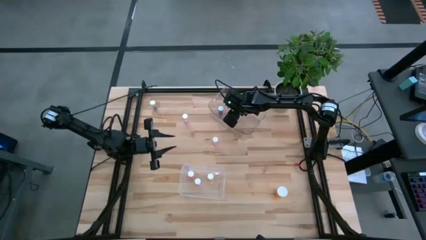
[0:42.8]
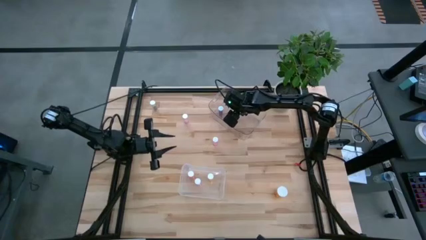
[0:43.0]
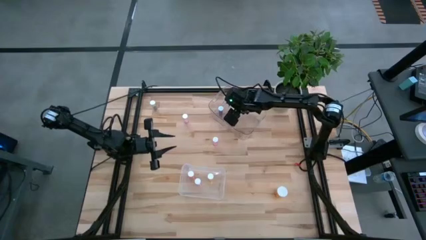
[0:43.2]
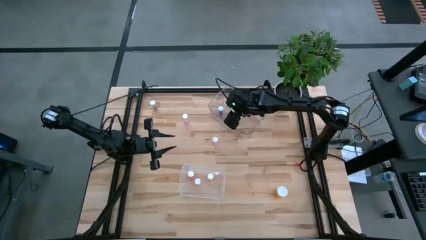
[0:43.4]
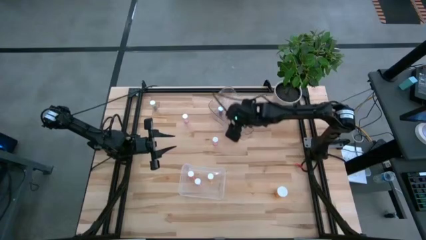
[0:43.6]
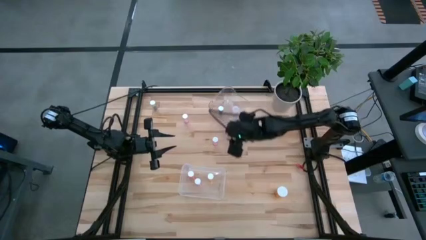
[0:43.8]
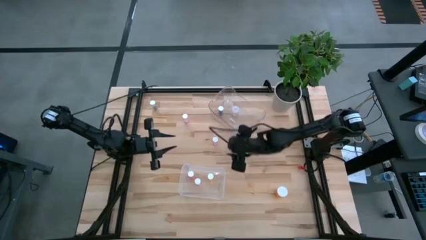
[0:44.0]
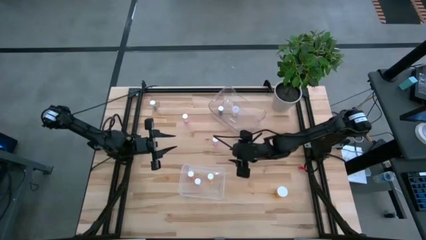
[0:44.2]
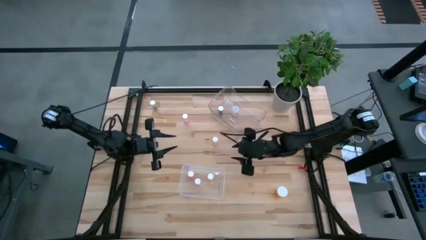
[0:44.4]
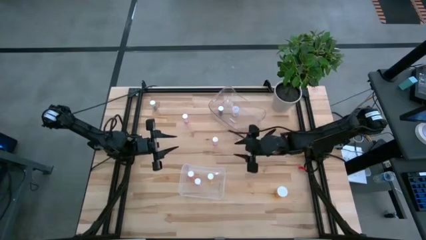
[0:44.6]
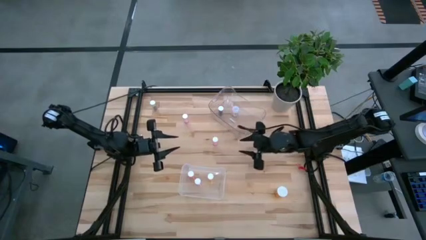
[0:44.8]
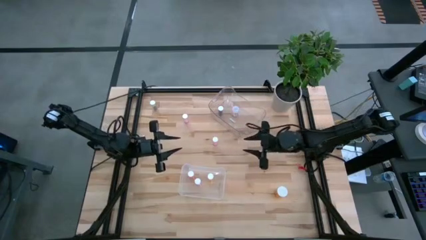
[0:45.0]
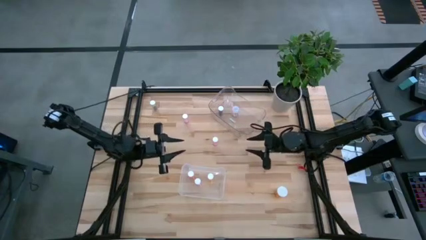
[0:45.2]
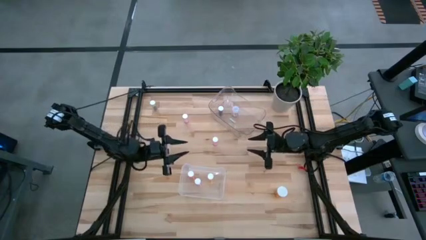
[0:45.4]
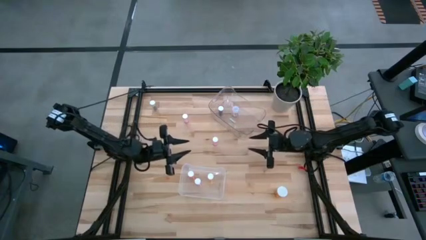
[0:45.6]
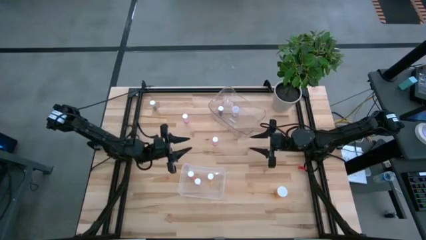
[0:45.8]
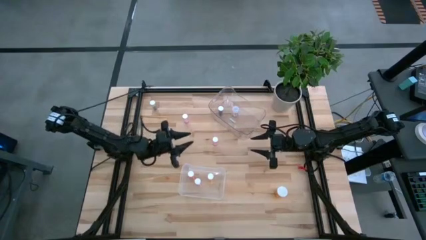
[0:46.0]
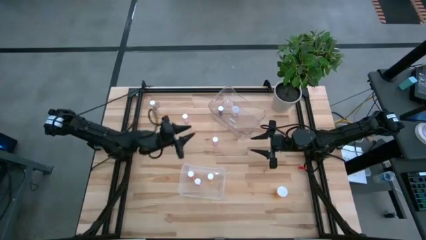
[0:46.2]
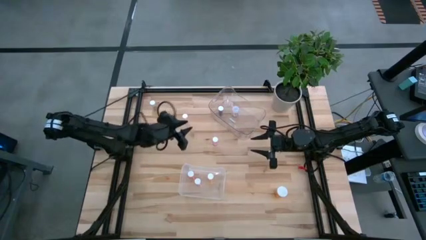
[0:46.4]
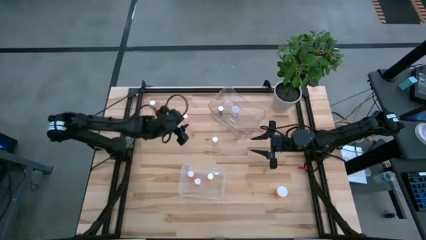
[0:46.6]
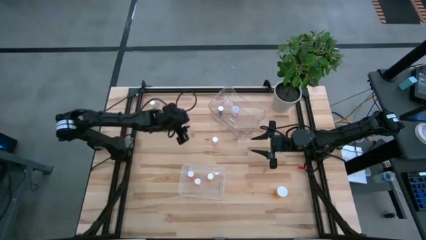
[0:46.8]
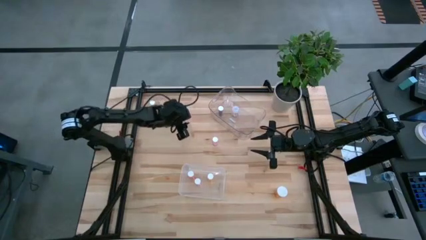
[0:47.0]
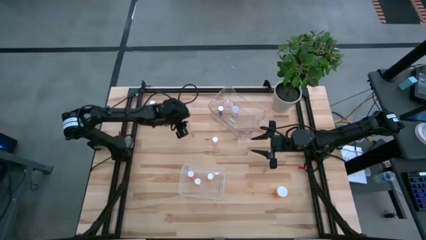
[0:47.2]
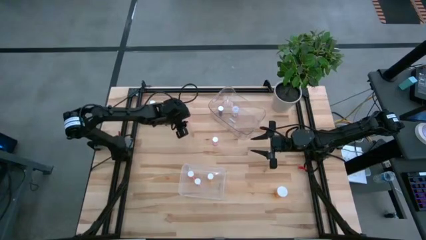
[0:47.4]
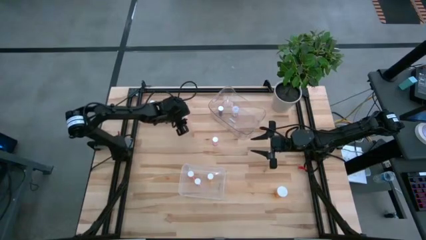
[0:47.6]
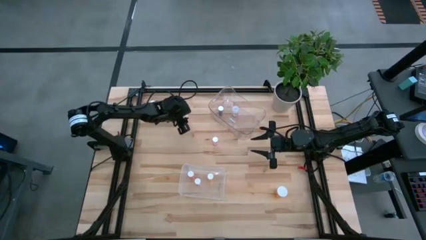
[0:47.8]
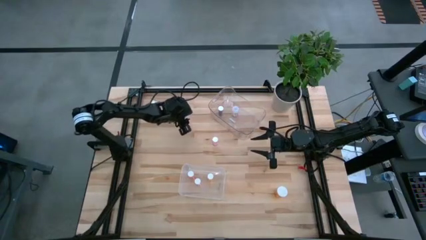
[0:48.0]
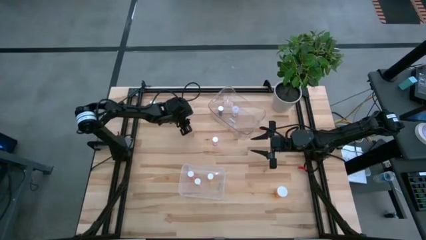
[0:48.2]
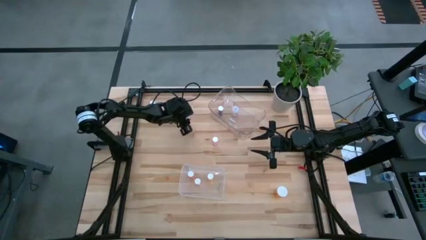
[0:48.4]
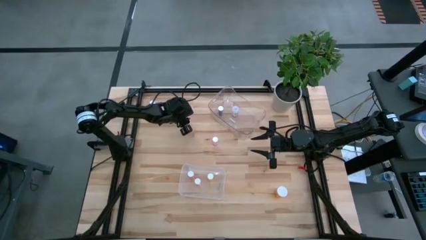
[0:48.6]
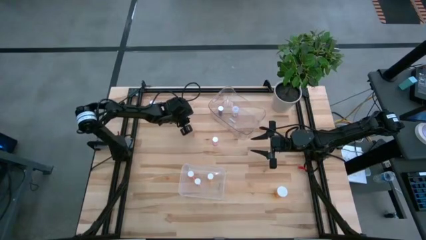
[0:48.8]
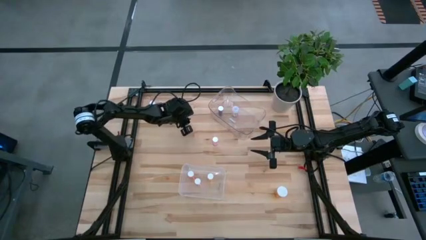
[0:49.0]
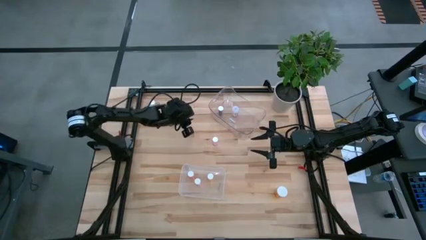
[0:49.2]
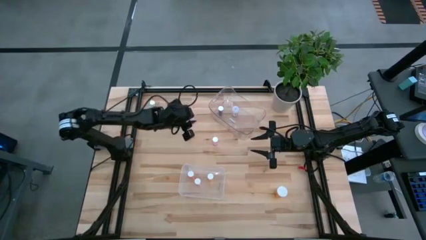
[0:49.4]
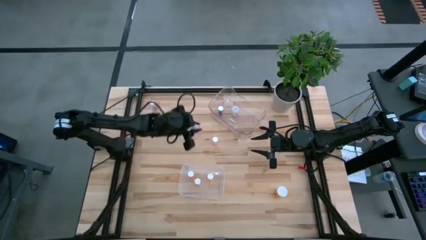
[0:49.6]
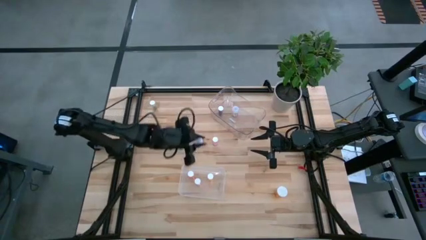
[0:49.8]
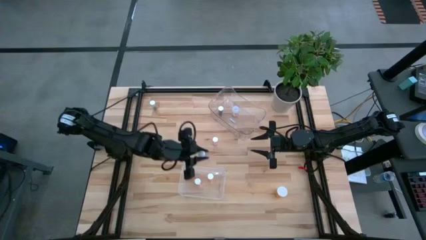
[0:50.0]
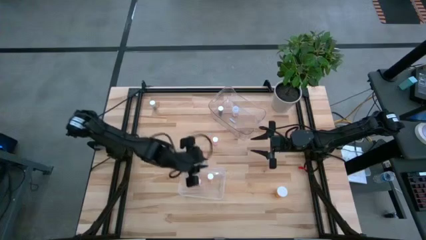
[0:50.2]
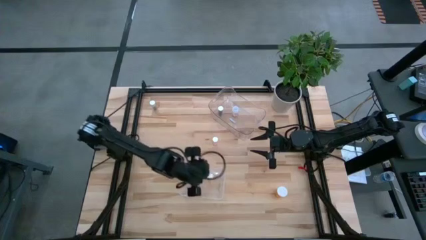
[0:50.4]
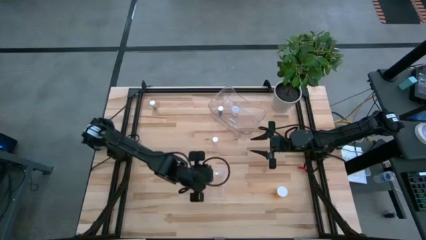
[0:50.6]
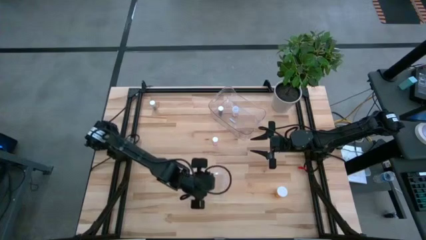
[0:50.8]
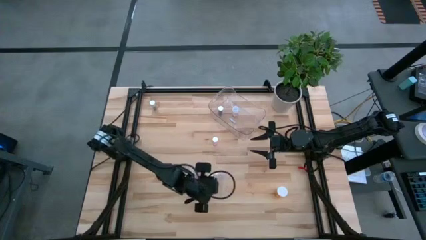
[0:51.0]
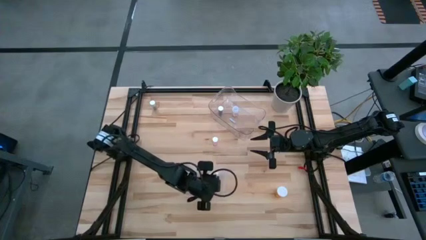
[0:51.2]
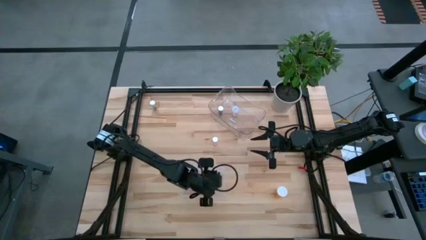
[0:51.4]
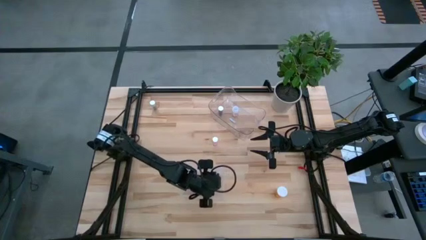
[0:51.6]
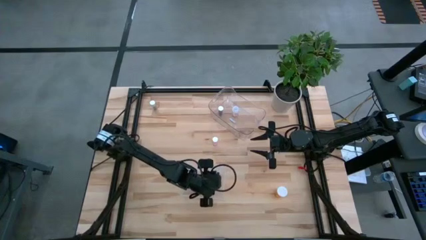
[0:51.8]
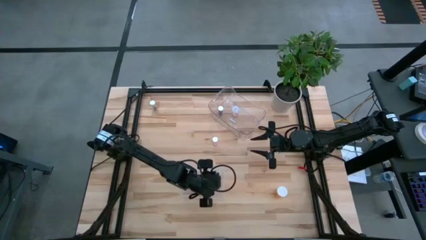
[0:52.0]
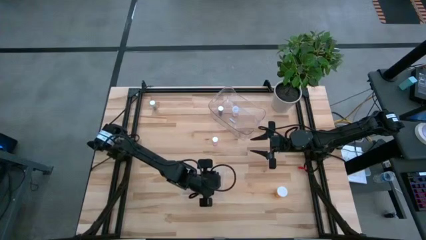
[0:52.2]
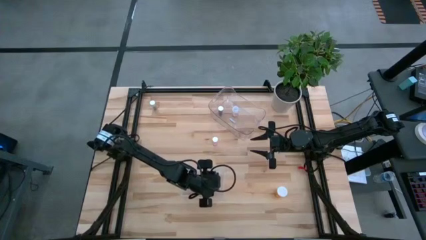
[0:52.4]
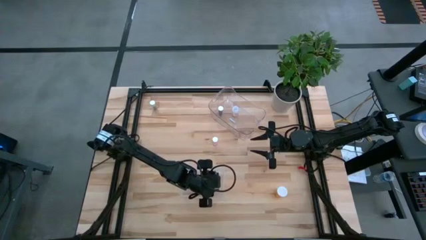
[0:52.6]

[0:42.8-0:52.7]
Task: Pick and place medicine bottles into bin by pill shape (circle, oval)
Put the left purple tablet bottle into the bottom transparent bin

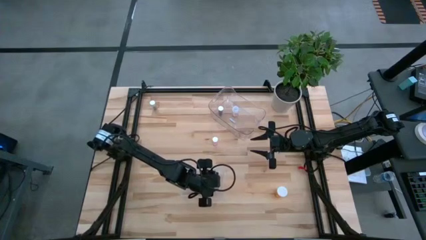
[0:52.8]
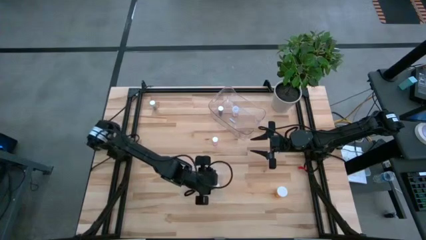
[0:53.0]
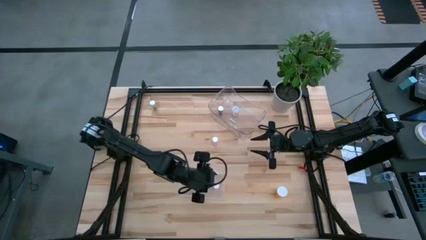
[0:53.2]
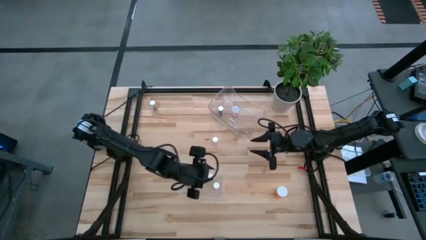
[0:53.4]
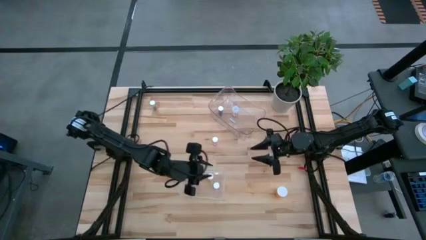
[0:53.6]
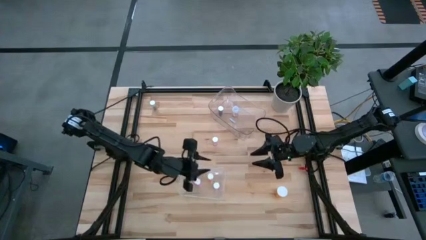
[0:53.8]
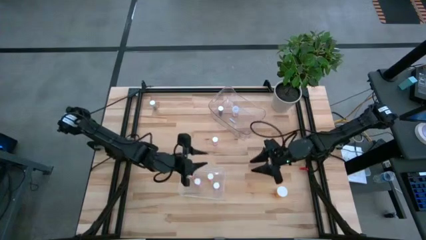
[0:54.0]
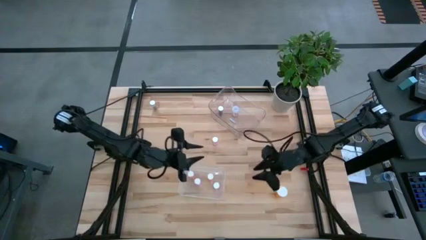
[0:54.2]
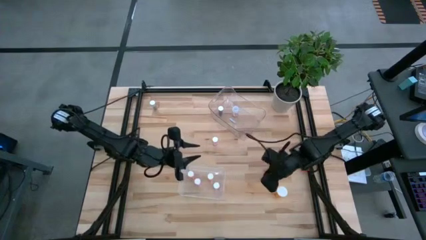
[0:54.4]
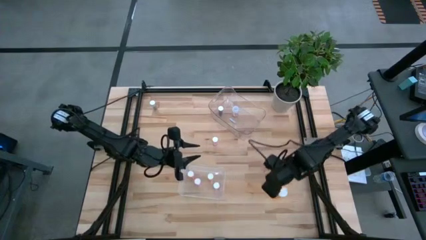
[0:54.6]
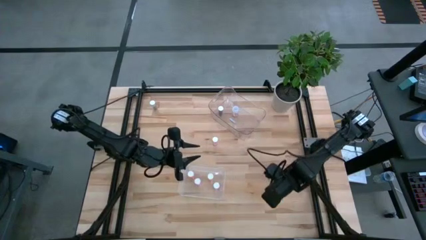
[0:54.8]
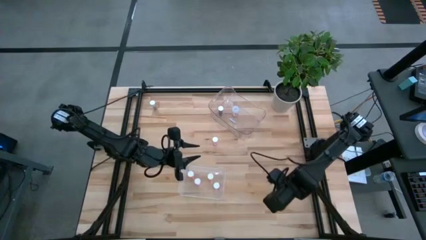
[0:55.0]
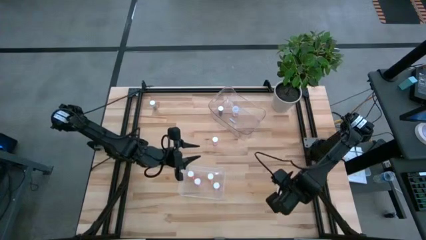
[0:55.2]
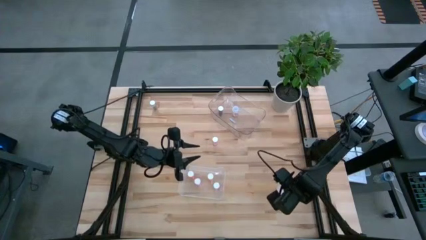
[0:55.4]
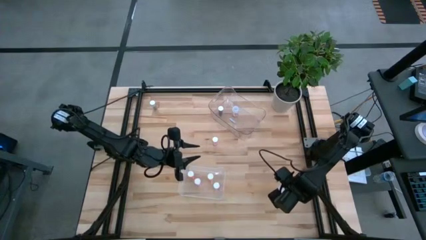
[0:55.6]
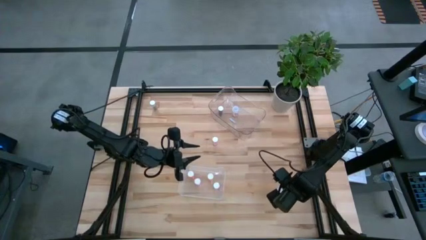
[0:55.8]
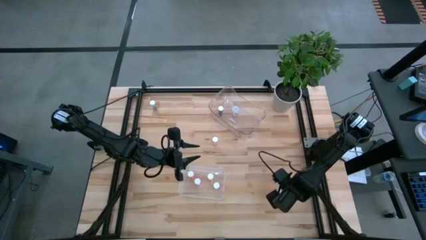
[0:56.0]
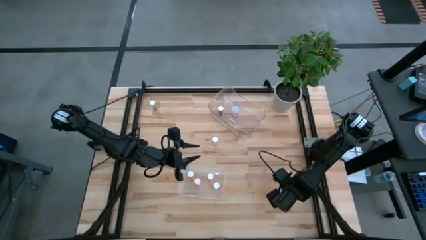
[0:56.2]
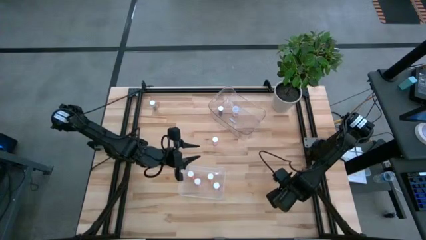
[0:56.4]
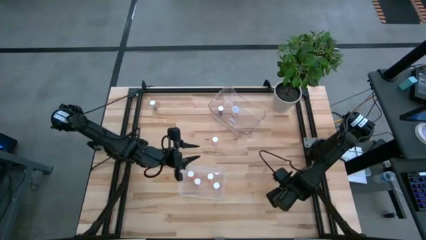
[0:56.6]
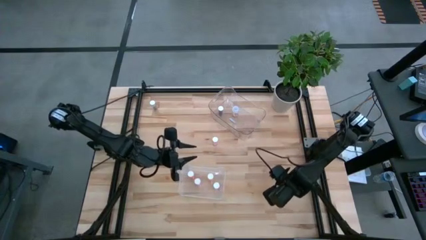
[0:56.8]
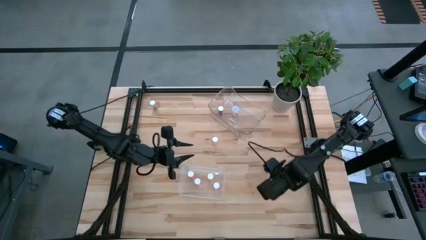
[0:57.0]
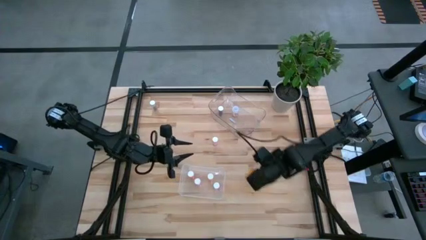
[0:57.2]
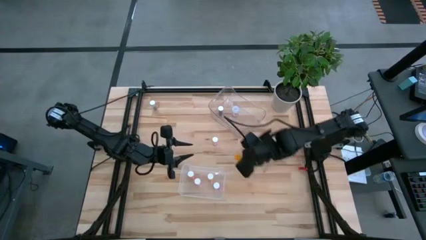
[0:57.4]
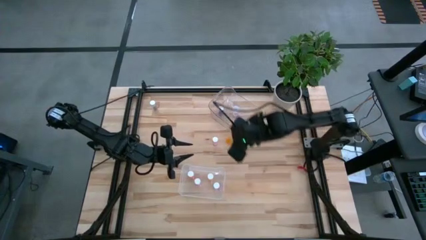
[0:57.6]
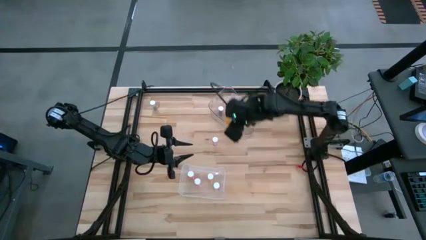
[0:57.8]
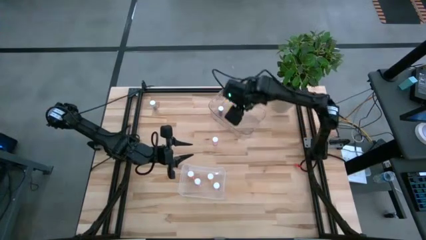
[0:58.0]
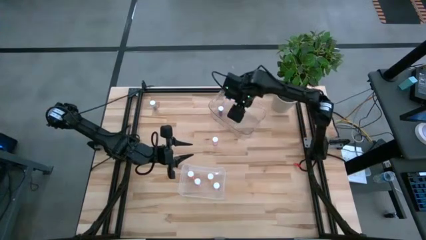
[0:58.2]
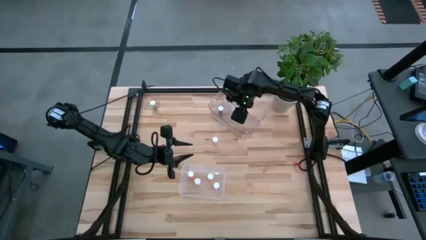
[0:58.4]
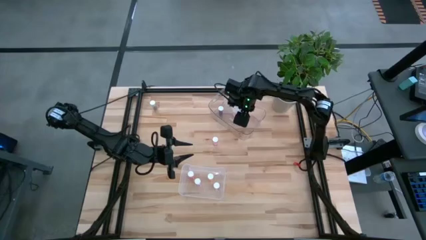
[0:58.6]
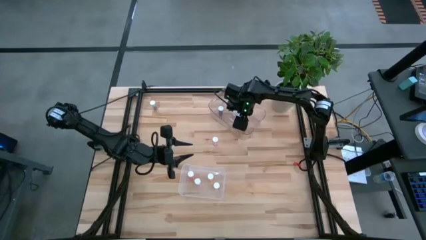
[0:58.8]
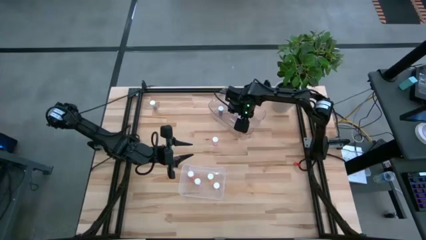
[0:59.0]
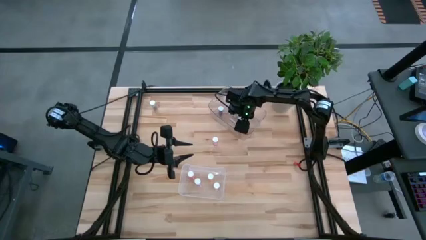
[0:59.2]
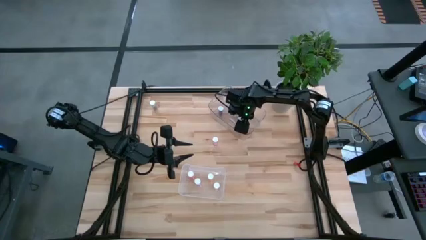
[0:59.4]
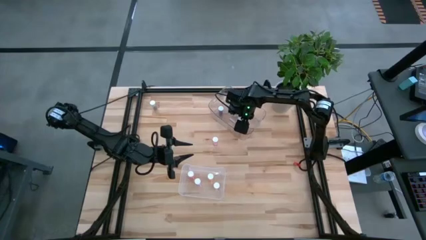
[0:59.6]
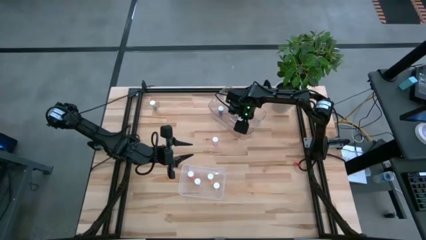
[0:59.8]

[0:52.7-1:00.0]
Put the orange capsule bottle into the top transparent bin
